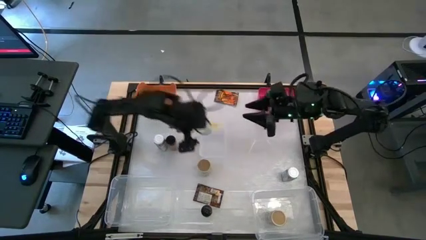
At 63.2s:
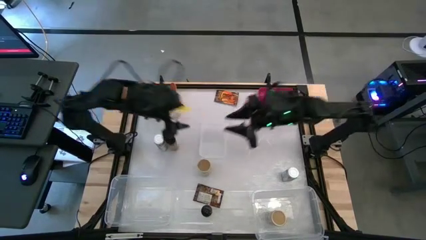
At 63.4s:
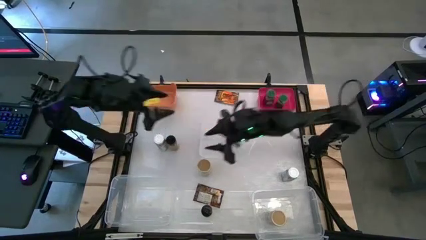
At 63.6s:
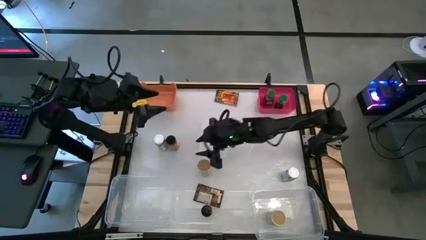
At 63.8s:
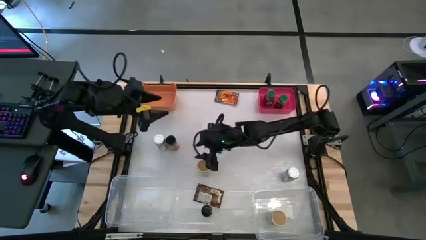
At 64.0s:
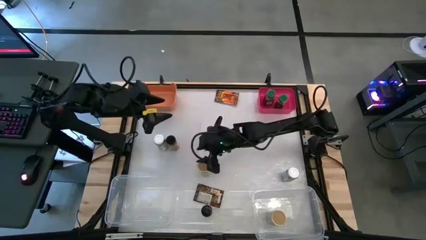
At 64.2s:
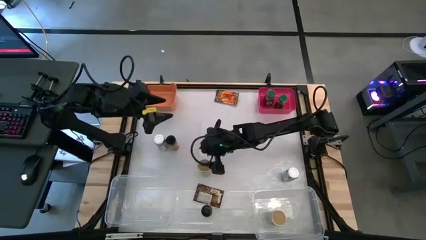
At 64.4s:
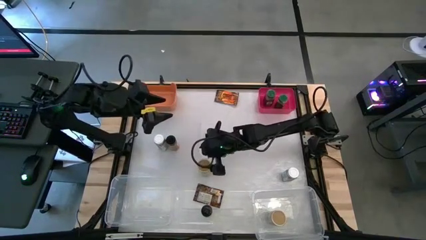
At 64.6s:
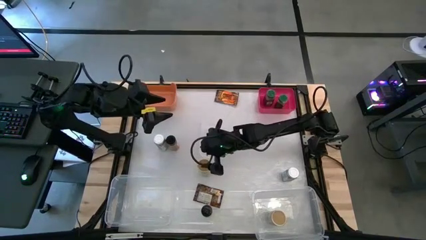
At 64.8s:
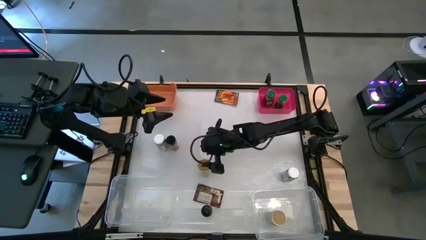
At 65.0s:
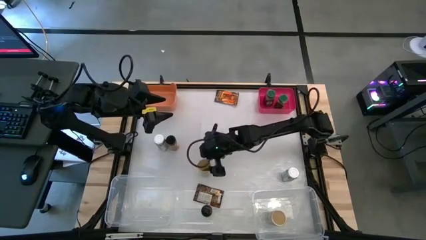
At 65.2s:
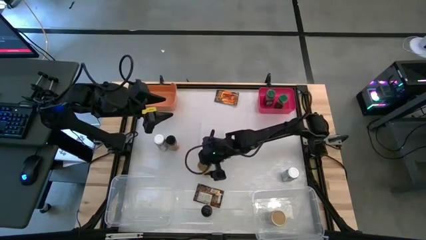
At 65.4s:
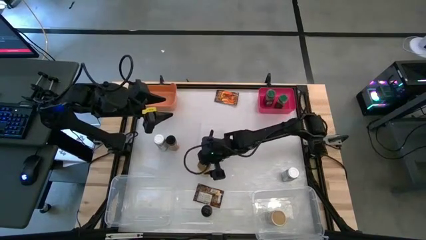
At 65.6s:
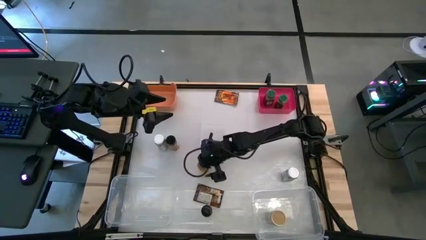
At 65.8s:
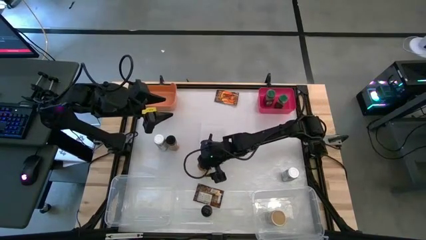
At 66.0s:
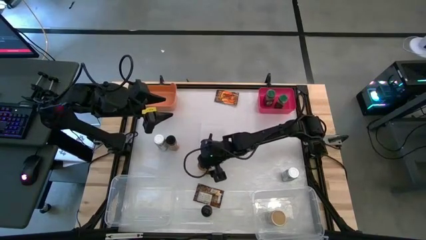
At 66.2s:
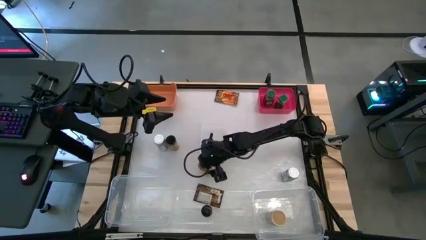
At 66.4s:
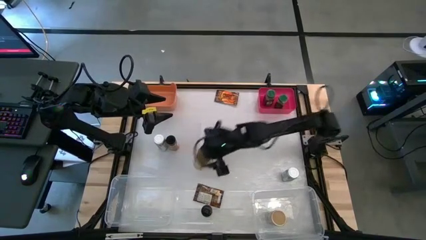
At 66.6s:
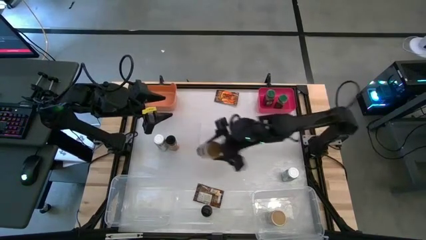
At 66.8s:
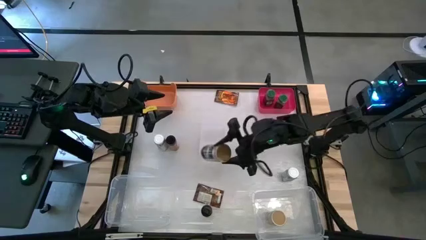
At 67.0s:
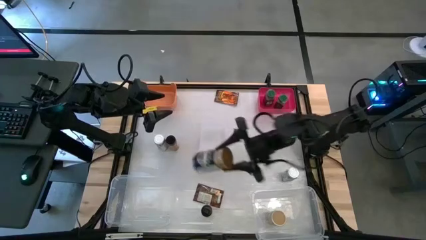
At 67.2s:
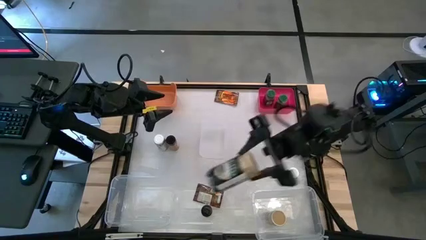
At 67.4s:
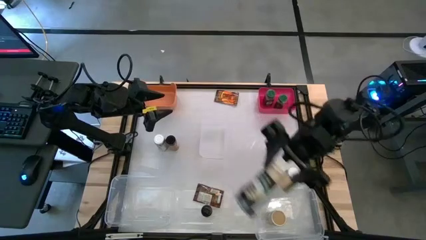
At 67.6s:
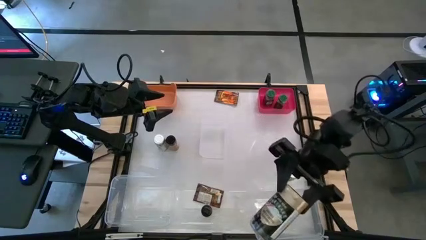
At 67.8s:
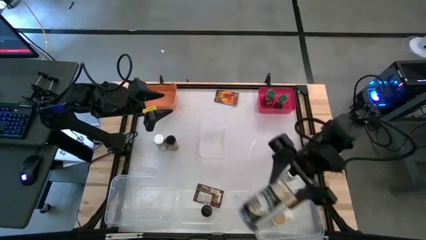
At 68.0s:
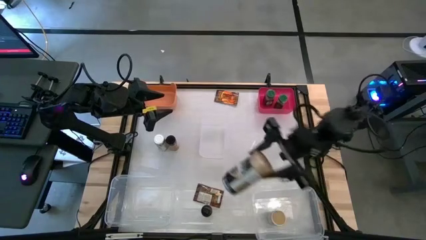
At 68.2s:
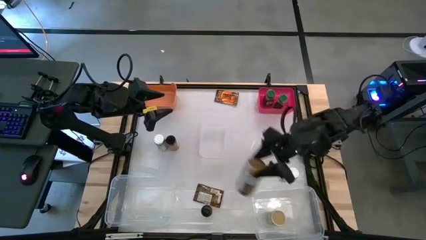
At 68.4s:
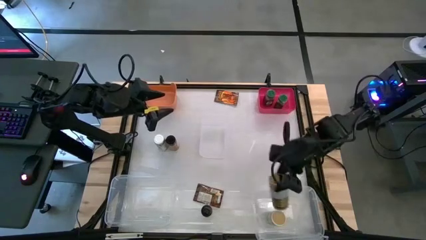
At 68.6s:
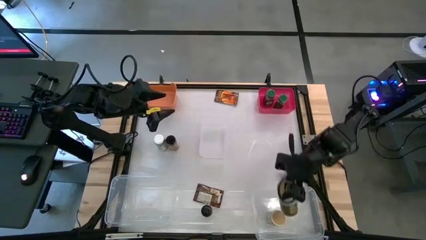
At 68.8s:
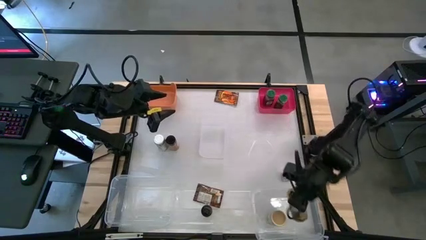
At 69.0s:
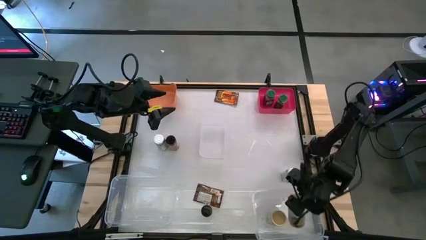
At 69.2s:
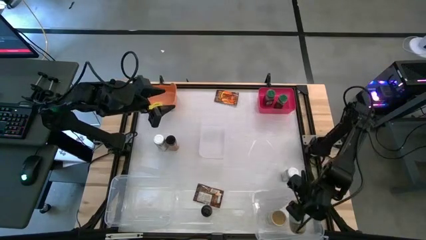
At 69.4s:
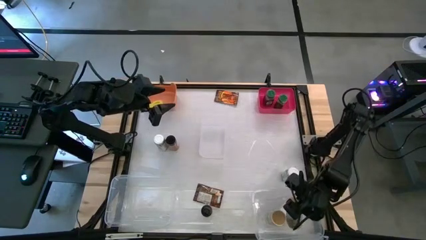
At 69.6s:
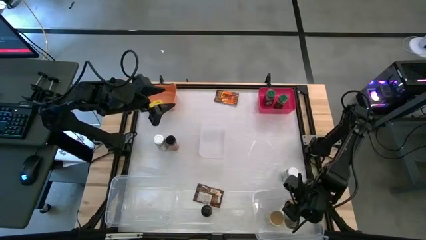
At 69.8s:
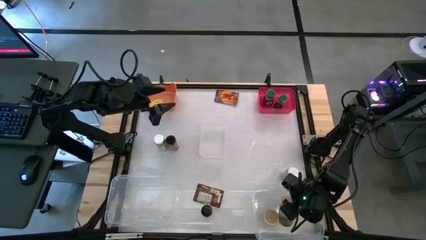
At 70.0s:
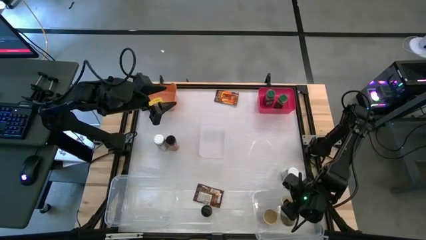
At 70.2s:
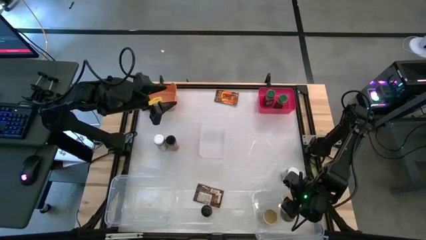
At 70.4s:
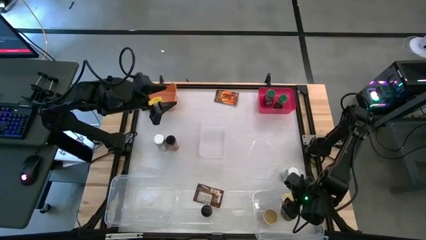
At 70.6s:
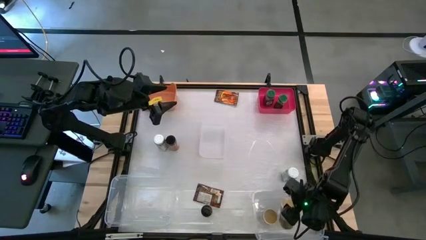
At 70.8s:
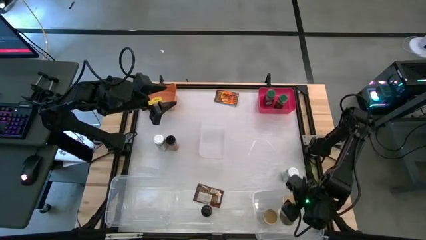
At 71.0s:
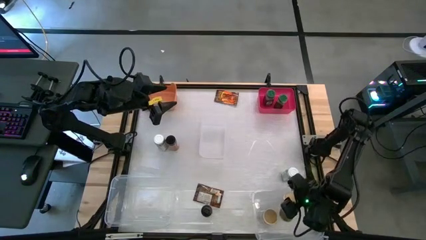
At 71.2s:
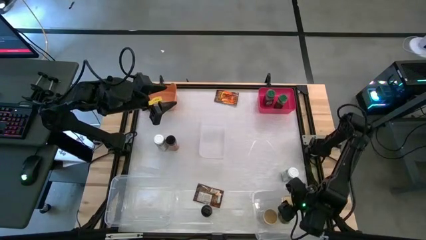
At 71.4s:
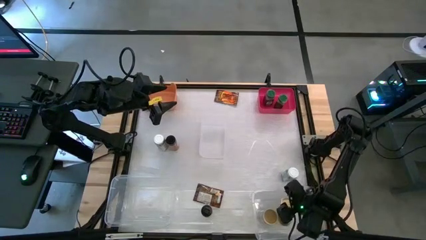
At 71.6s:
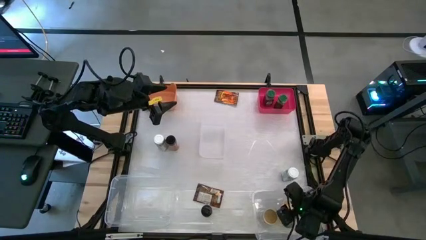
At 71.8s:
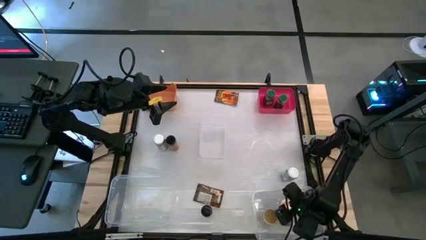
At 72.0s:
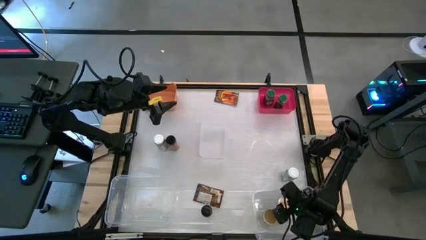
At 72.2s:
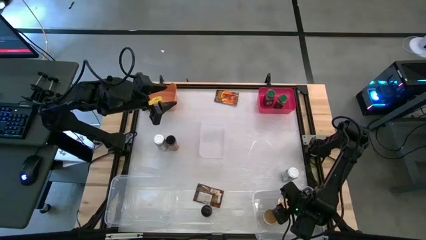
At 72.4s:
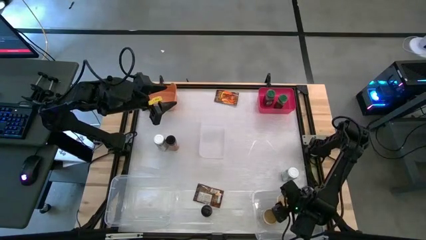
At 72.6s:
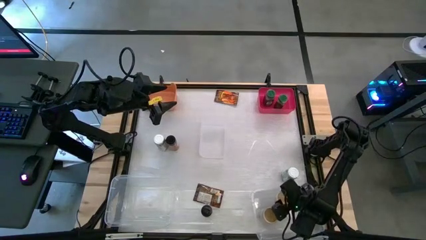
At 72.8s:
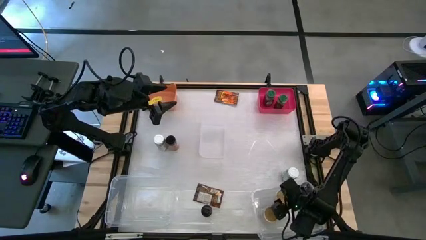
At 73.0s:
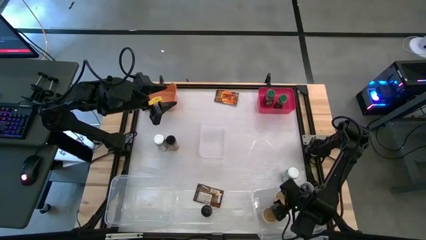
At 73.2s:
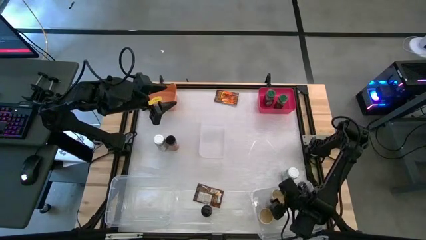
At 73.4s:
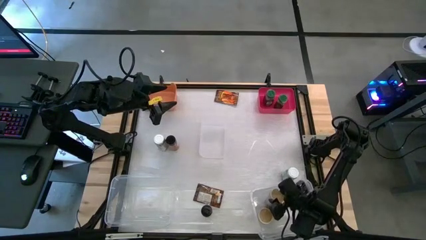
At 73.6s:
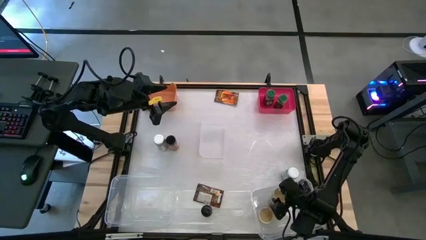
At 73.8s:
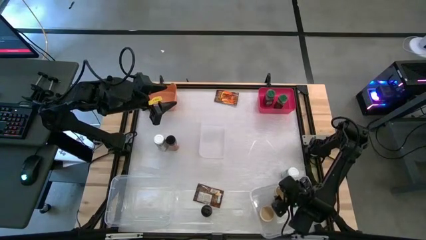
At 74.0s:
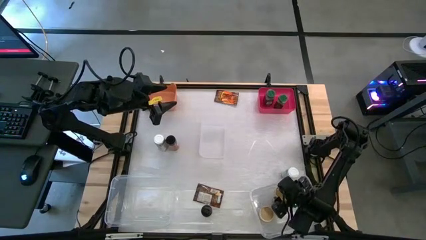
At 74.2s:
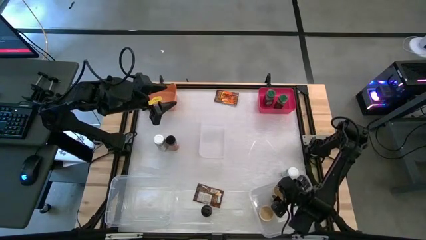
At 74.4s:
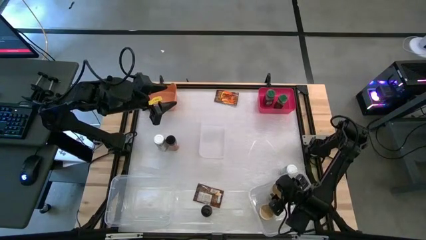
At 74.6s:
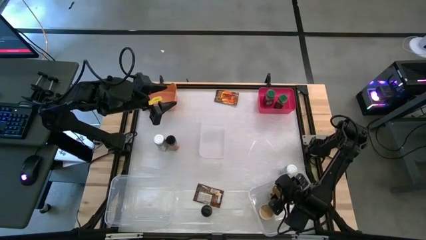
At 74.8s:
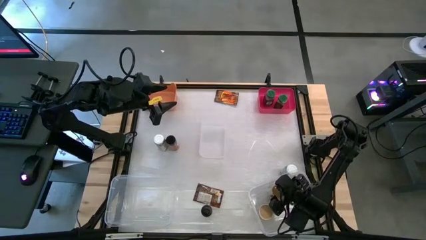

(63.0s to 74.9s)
Task: Sort spices by type
Put the gold seasoning bottle into the right transparent bin

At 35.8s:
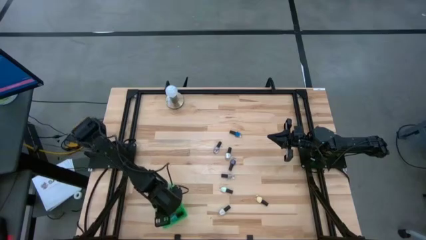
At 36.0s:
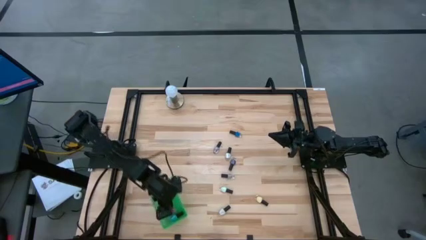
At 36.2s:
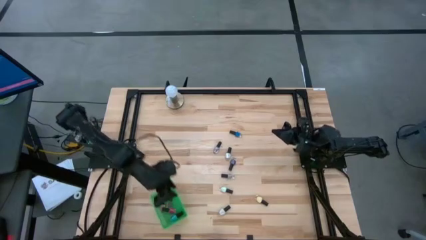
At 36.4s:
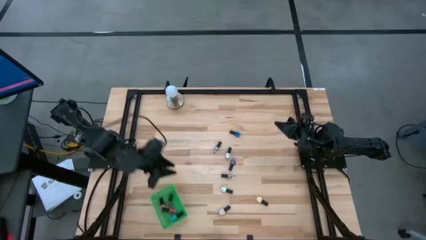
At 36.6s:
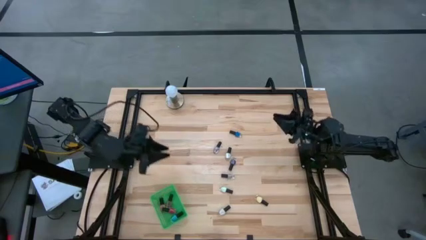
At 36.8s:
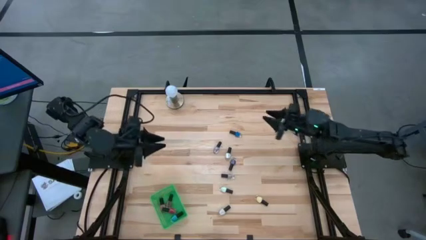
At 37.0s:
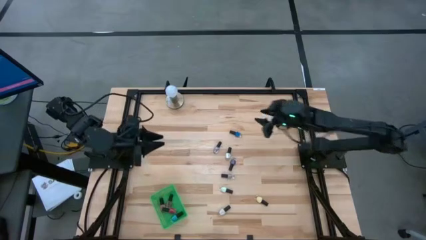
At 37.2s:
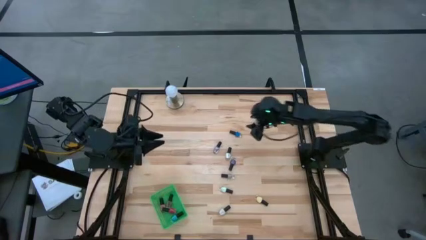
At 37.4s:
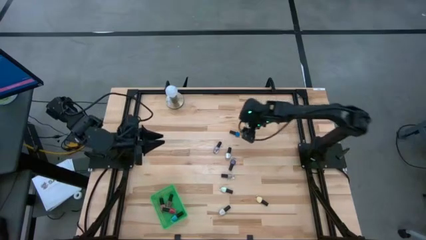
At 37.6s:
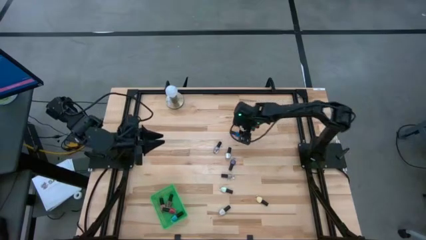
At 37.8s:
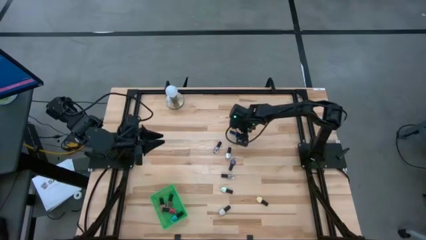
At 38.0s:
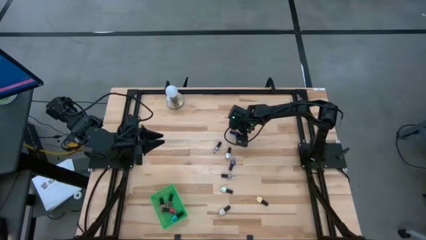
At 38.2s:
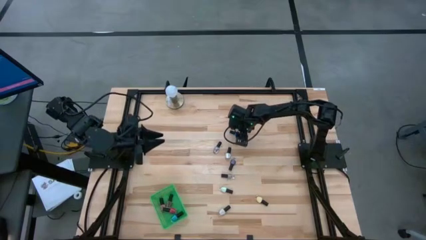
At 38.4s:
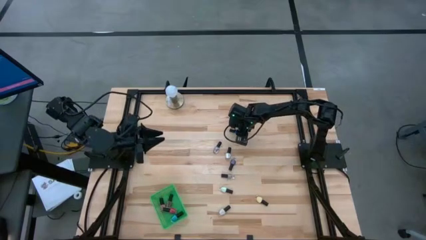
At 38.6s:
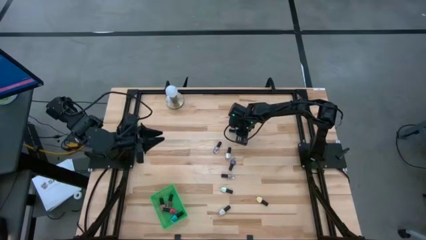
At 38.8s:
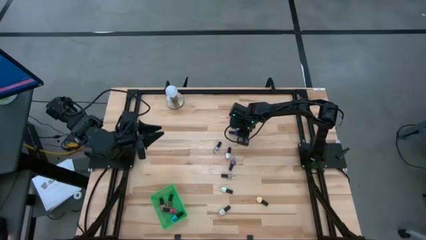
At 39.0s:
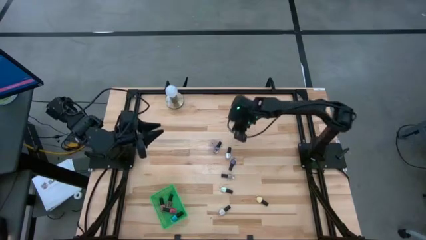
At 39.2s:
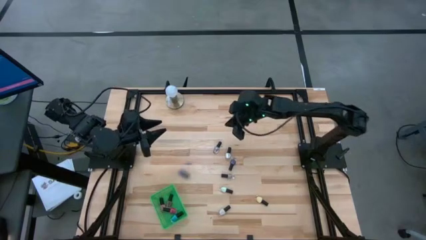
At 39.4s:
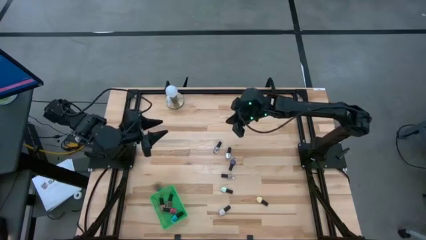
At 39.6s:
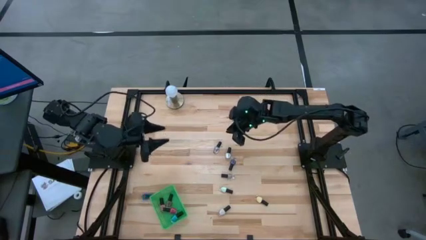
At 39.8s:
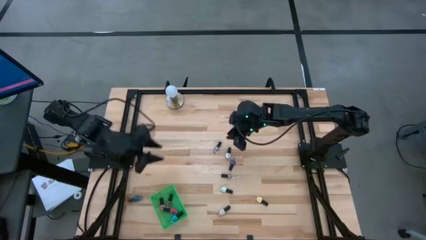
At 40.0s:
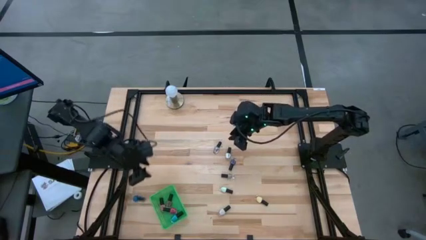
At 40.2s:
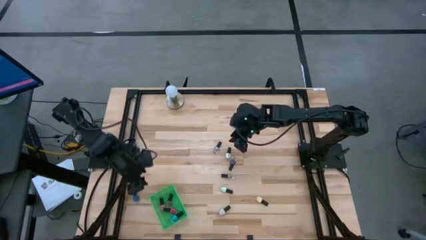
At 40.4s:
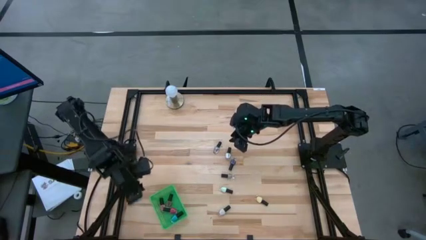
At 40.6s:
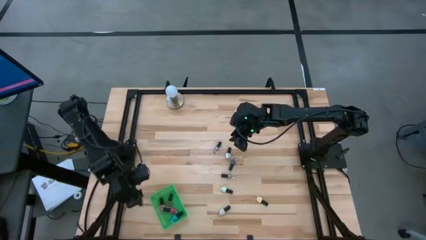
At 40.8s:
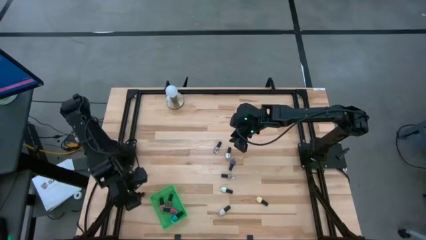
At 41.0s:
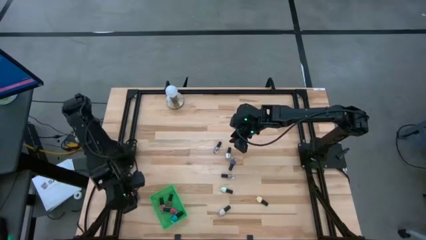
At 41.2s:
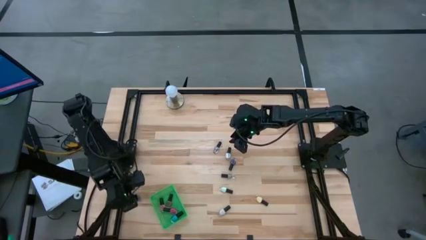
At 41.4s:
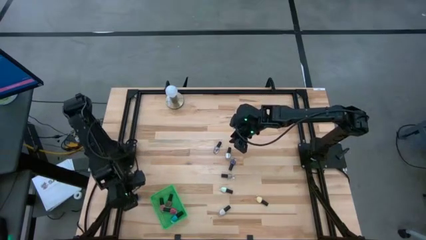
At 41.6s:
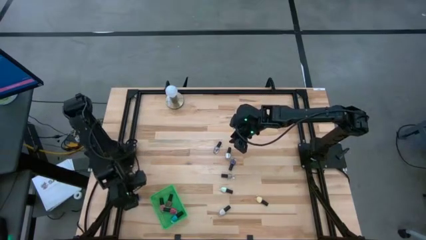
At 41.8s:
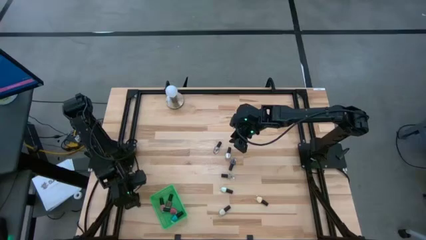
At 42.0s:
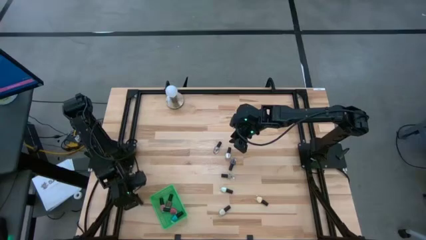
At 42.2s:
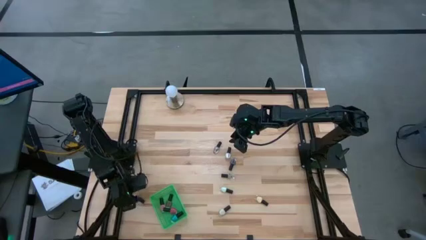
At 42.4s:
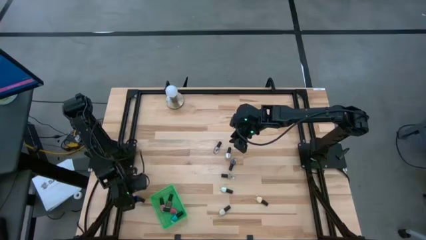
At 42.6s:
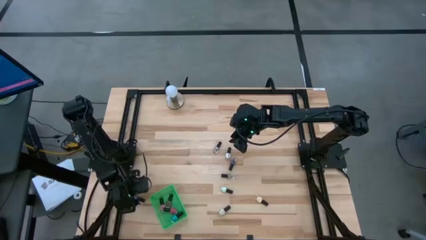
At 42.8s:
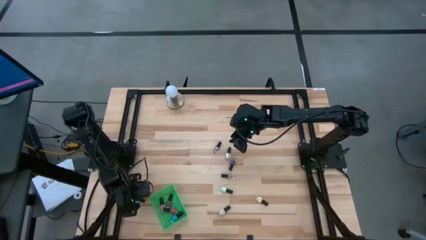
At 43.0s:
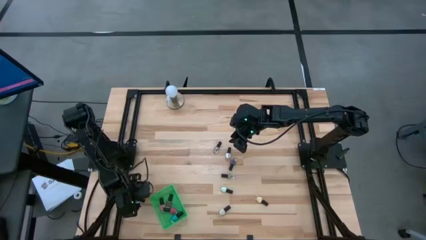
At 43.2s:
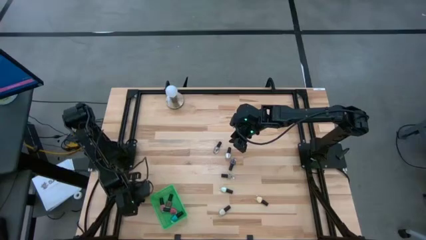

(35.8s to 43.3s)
Task: Pick & Place Nail Polish
Put the black dark blue nail polish bottle into the green basket
